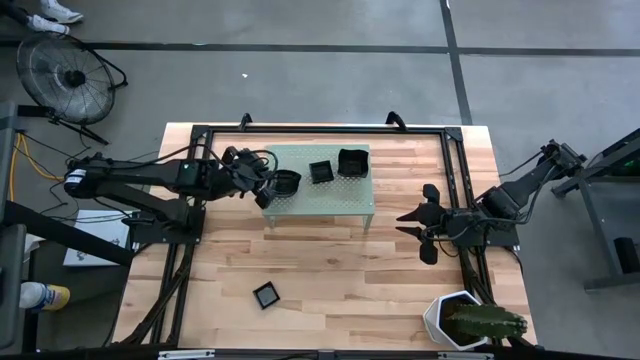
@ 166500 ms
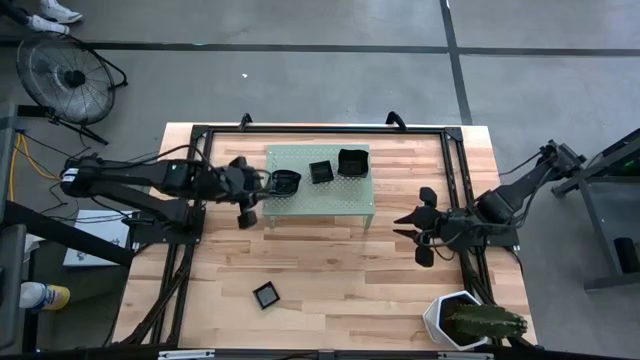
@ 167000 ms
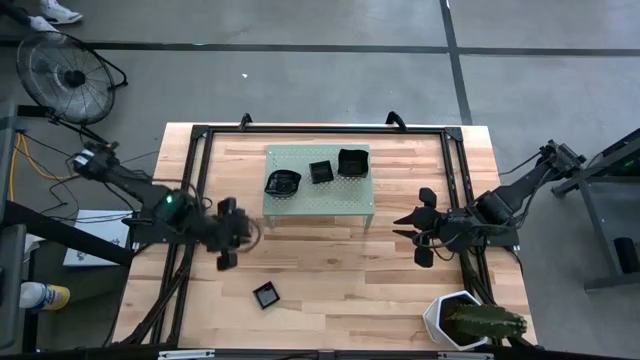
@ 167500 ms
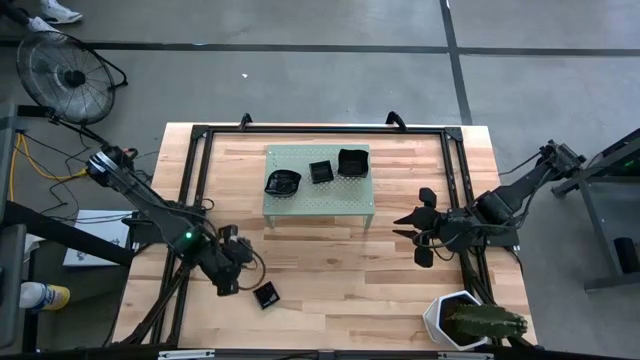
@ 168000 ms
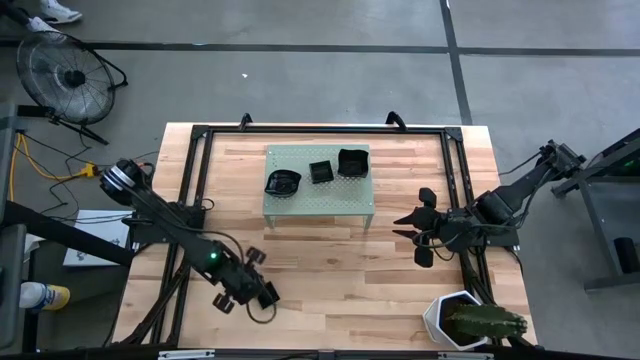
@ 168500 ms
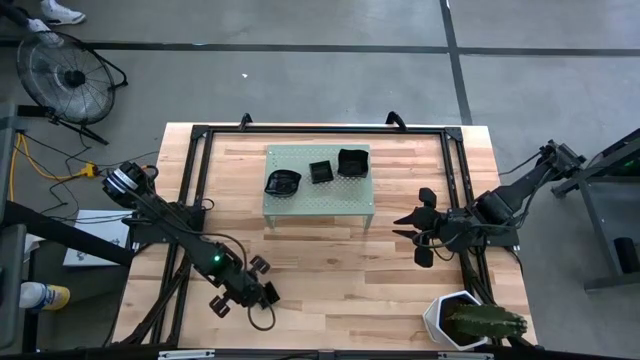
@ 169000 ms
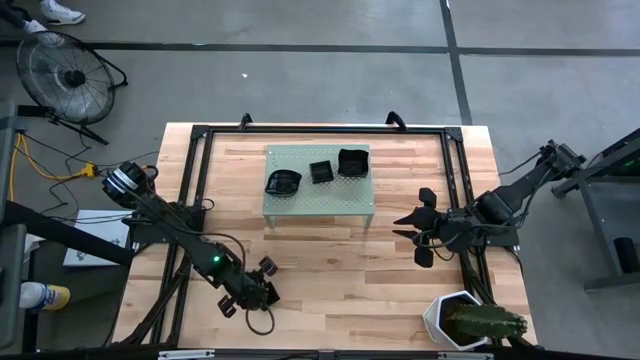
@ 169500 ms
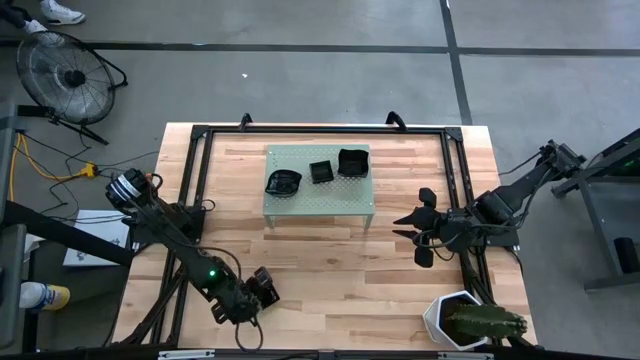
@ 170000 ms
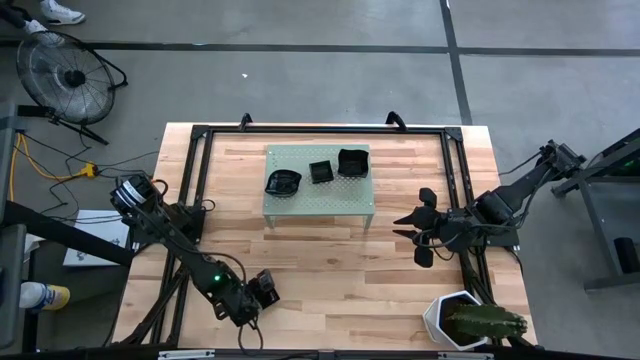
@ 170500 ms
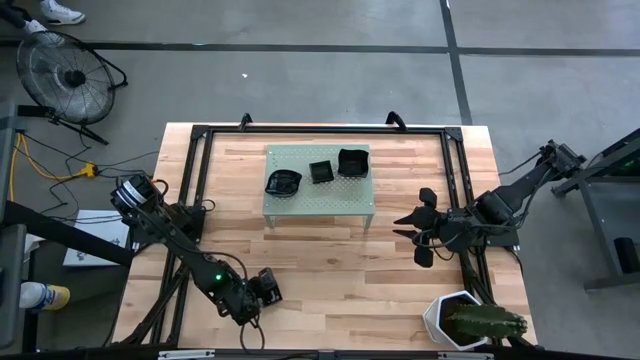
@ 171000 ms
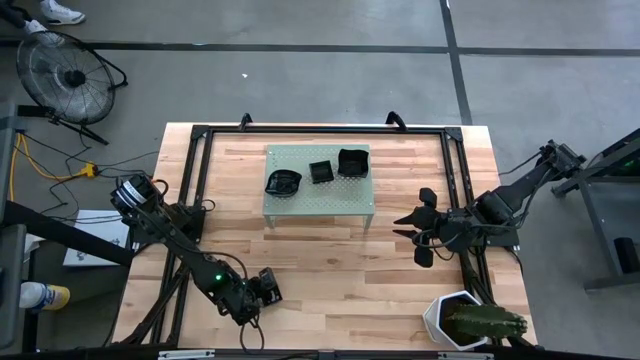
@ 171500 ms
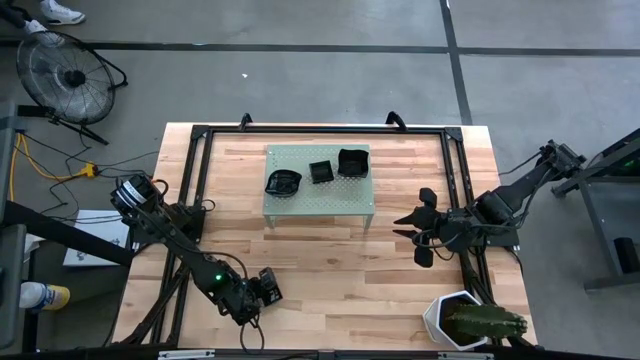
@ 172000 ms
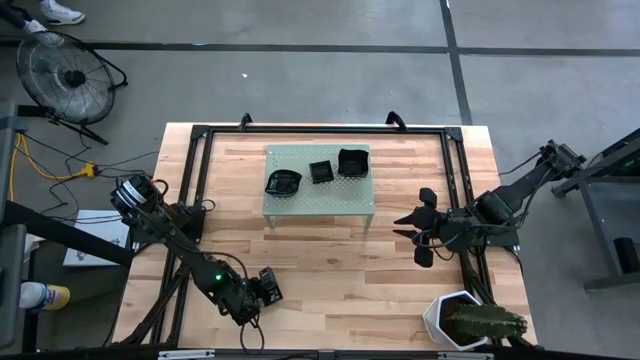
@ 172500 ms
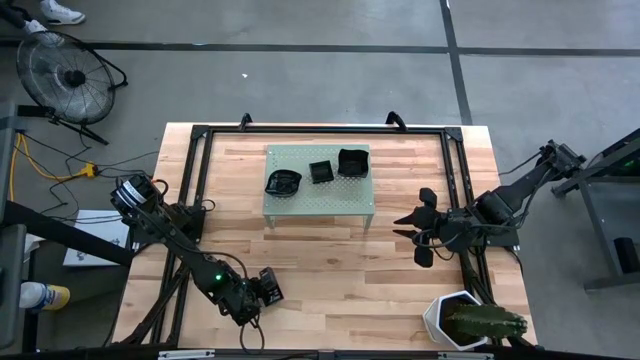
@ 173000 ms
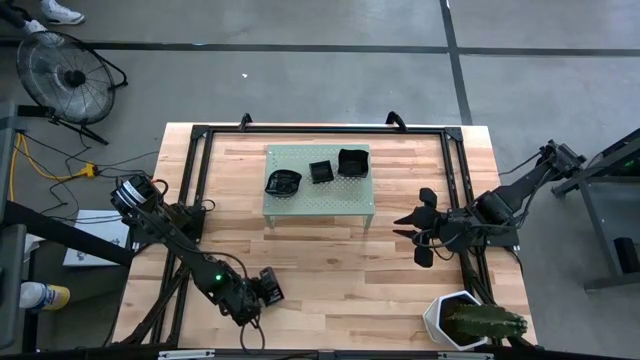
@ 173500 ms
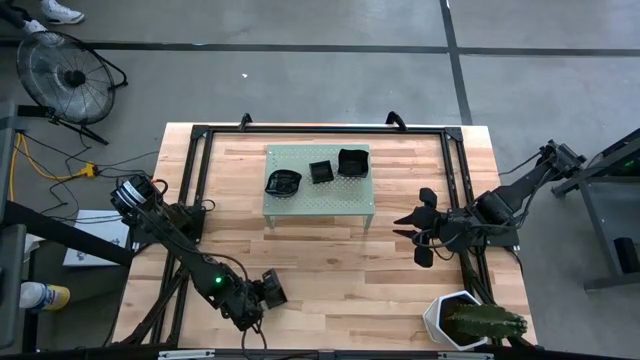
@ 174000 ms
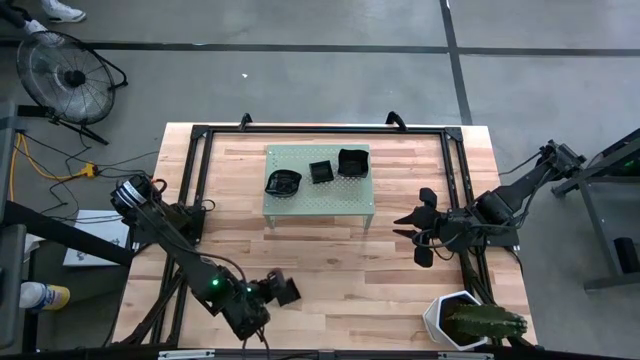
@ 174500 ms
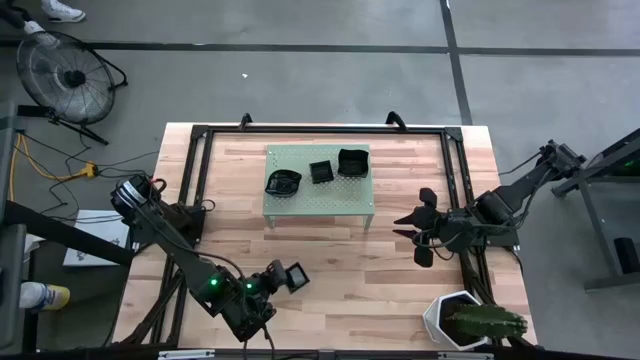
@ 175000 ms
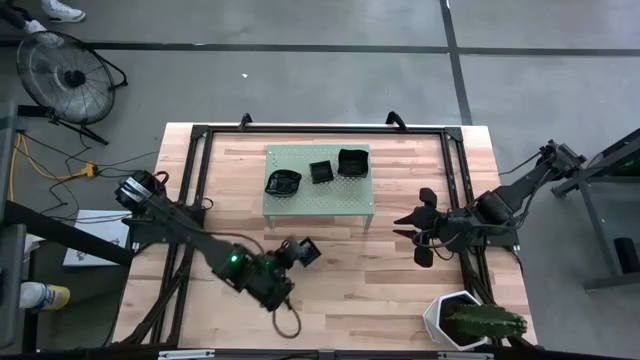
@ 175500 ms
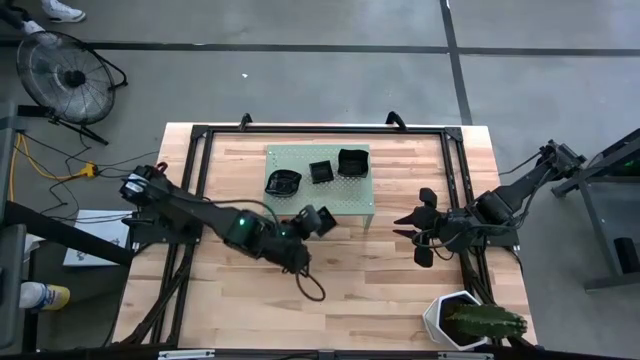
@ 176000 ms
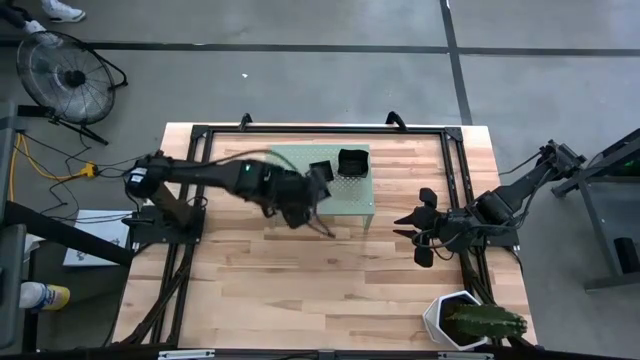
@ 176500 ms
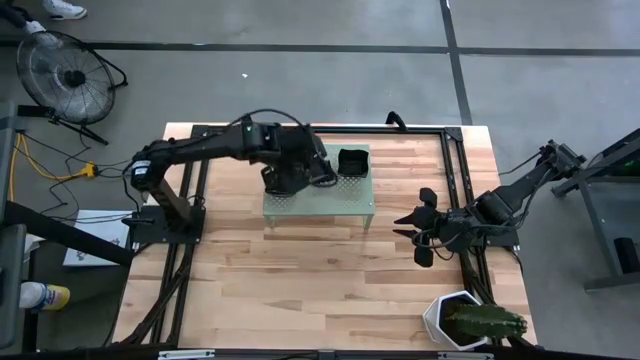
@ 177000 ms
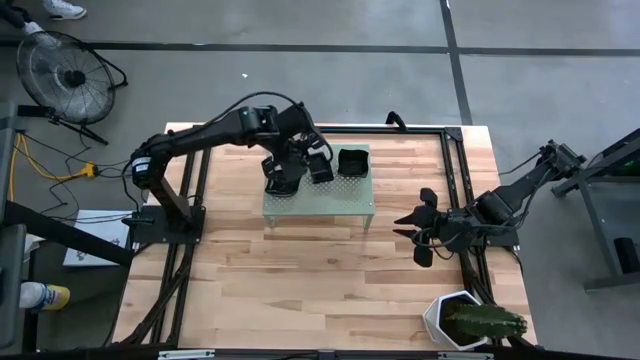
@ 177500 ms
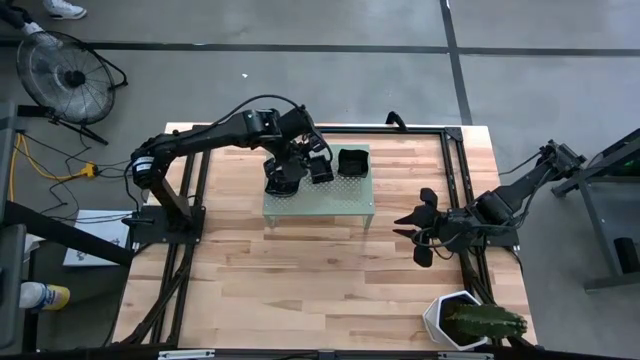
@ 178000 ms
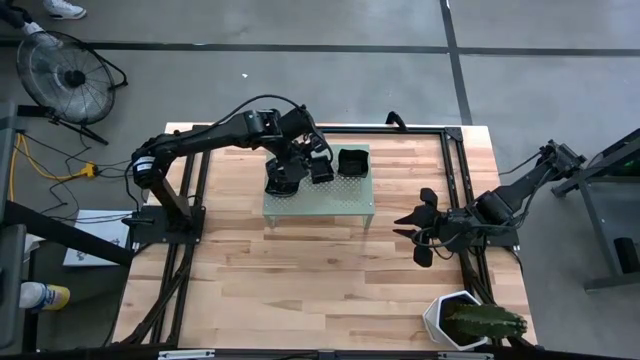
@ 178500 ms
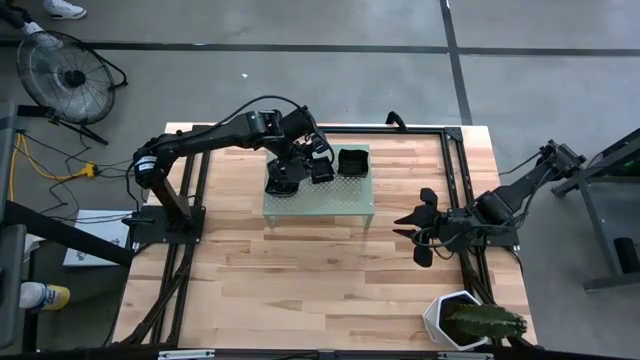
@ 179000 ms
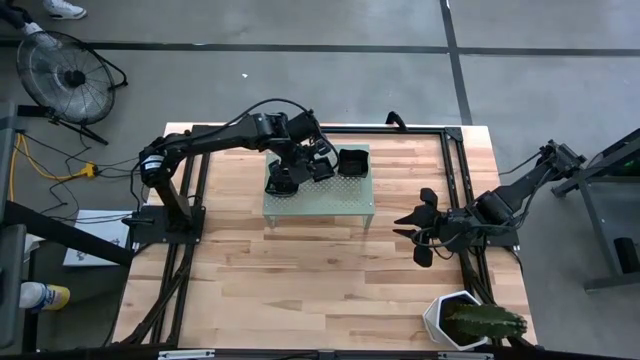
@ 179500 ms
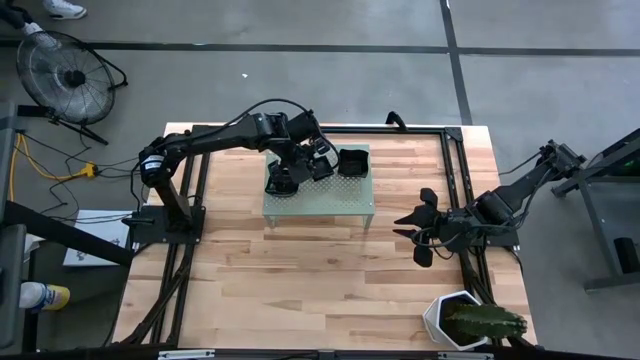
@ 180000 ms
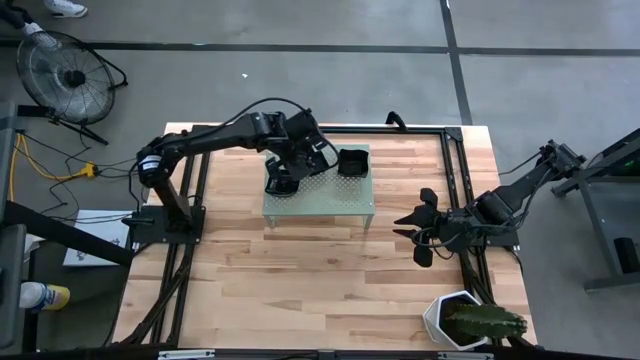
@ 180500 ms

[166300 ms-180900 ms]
Task: Pick & Place Mini shaped plates
Stack the square plate on top of the other square plates on the shelf

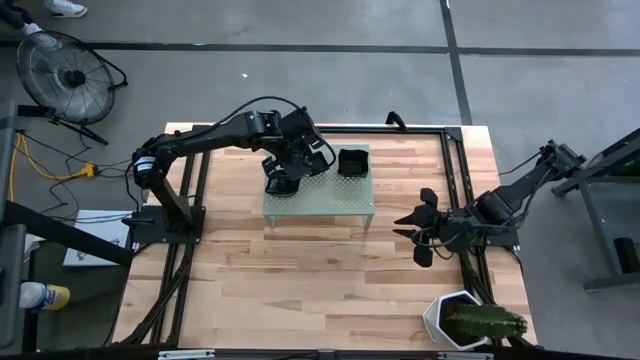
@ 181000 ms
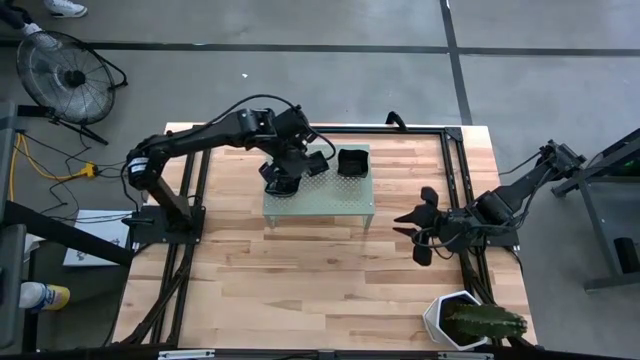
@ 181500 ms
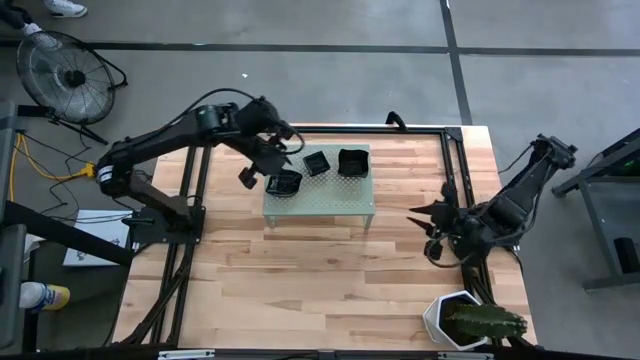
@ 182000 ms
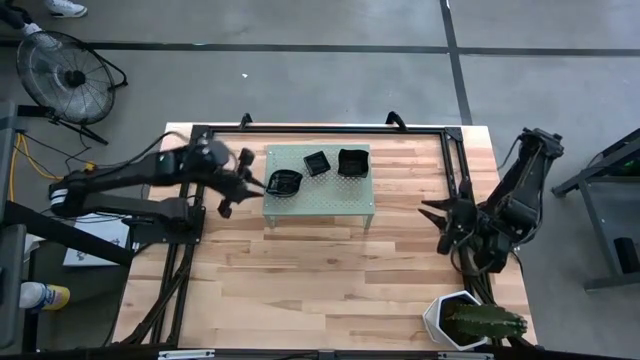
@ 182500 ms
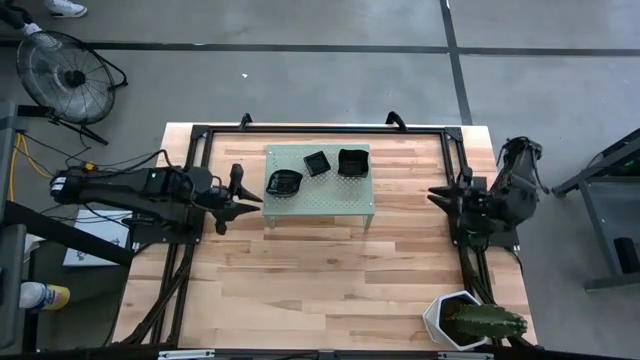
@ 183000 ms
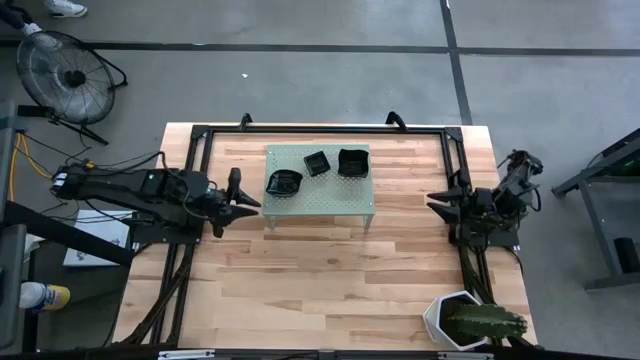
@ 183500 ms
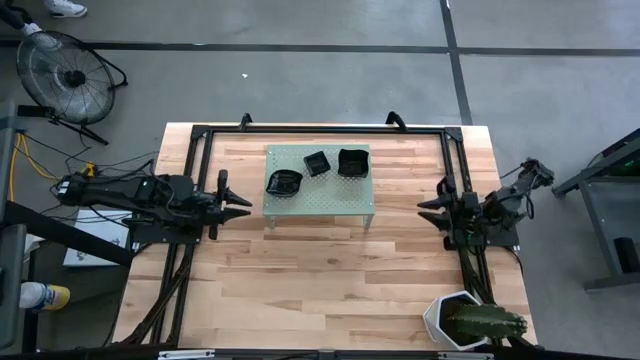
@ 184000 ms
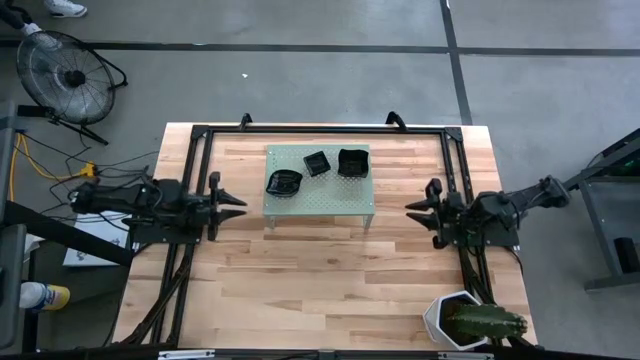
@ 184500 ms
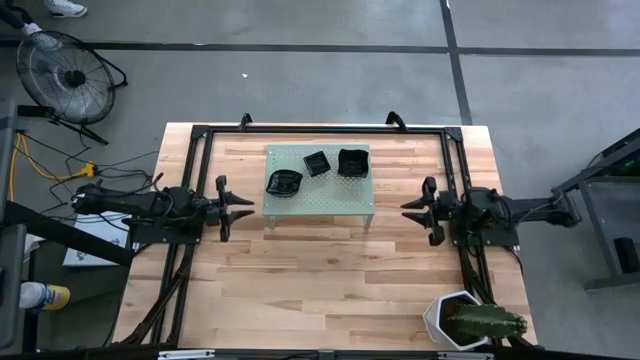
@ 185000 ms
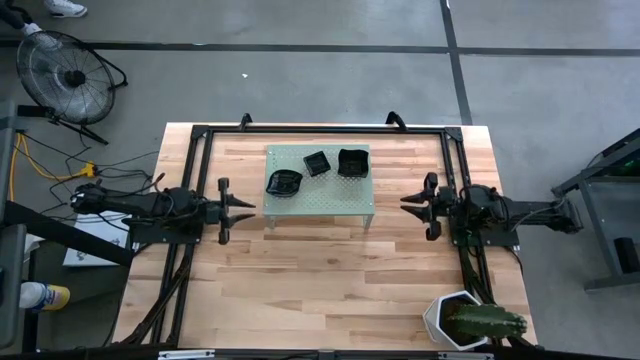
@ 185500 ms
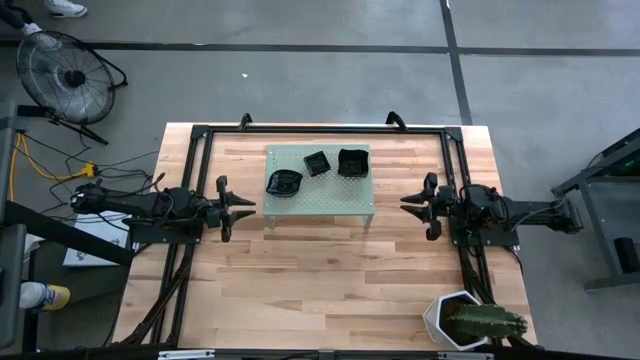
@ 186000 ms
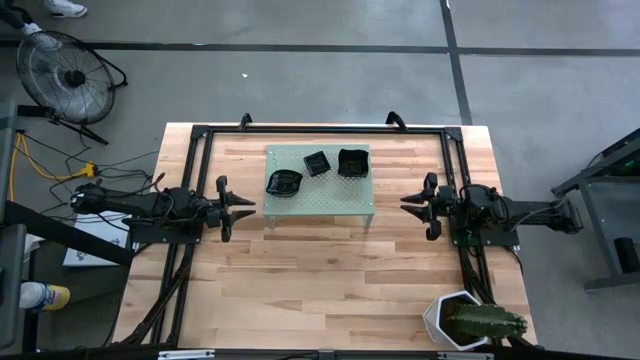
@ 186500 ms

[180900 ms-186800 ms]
Return to Home Position
